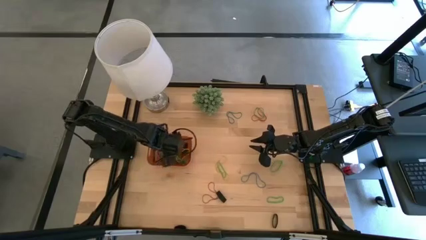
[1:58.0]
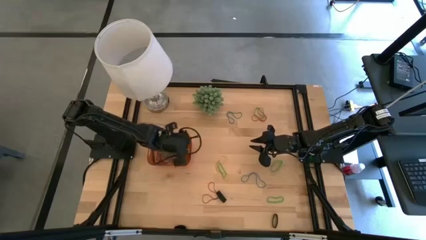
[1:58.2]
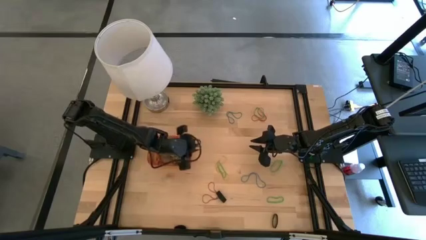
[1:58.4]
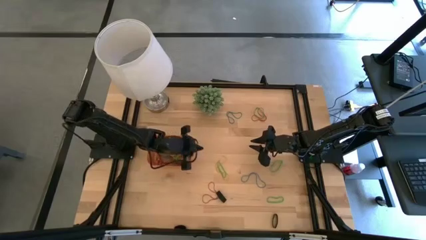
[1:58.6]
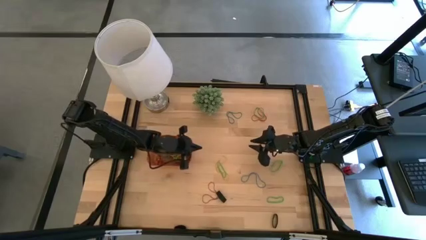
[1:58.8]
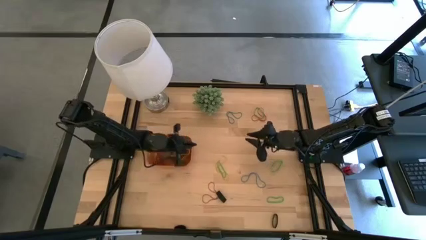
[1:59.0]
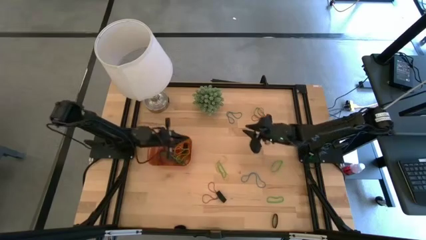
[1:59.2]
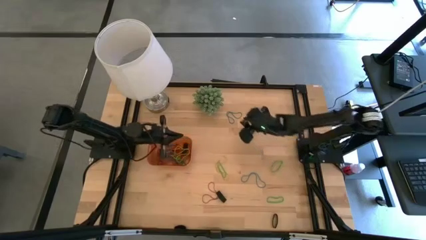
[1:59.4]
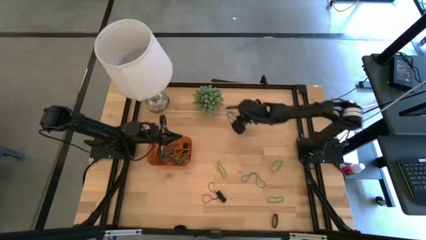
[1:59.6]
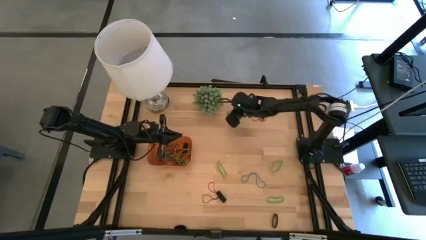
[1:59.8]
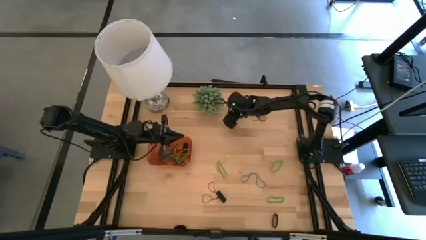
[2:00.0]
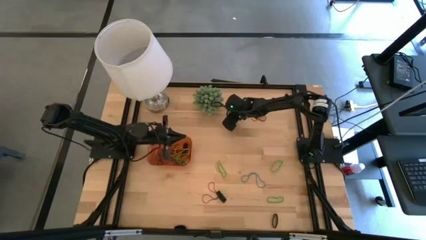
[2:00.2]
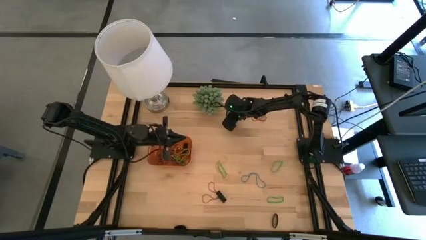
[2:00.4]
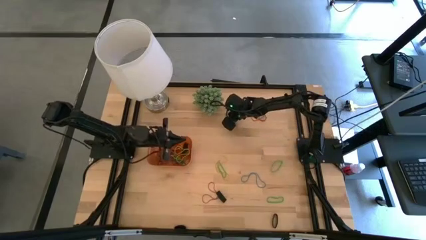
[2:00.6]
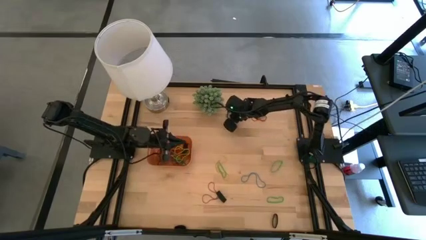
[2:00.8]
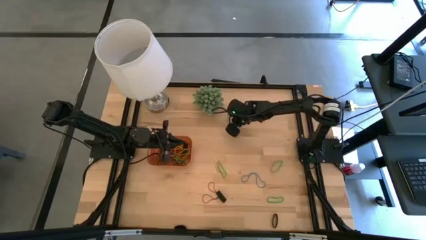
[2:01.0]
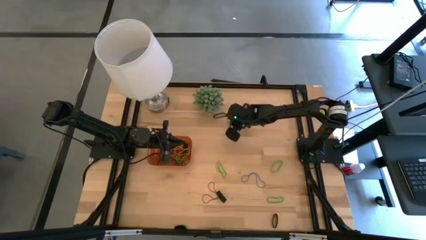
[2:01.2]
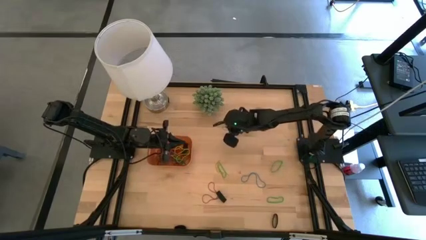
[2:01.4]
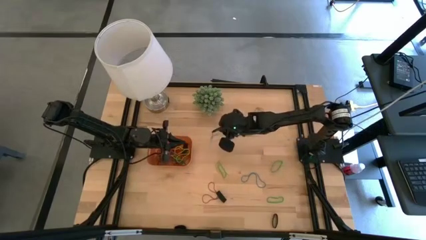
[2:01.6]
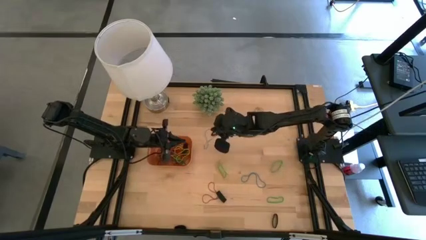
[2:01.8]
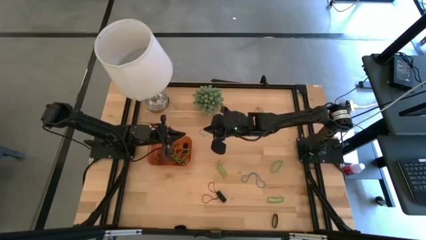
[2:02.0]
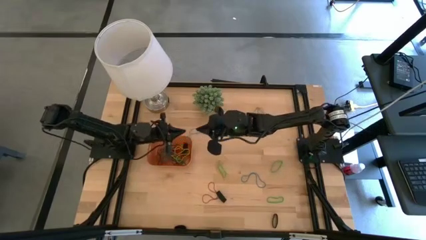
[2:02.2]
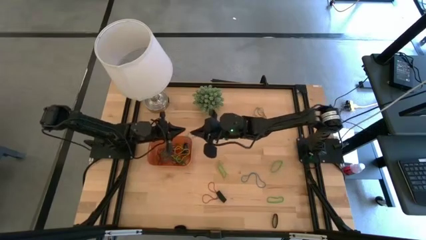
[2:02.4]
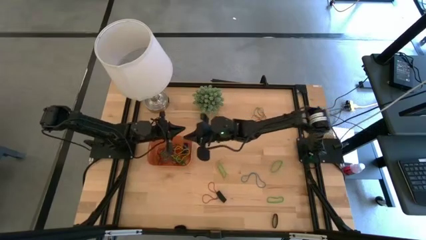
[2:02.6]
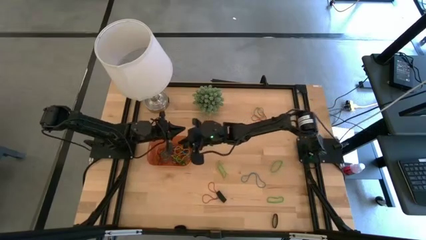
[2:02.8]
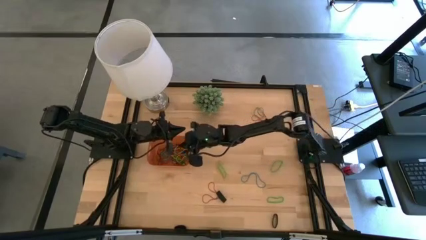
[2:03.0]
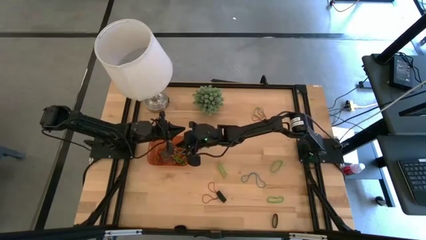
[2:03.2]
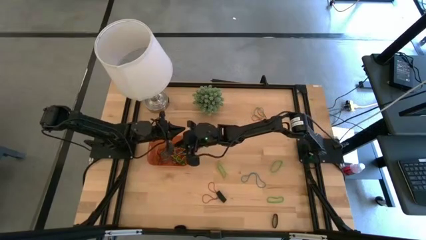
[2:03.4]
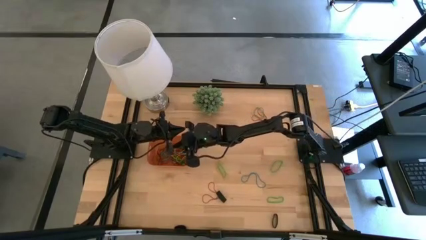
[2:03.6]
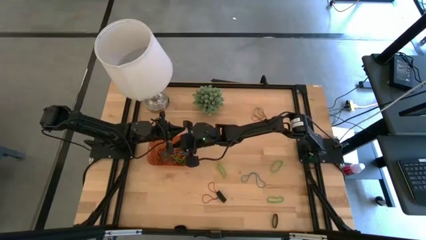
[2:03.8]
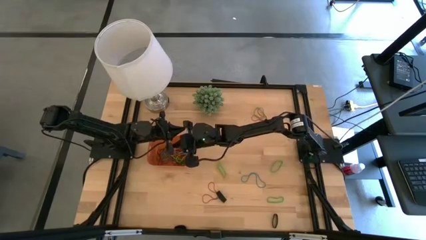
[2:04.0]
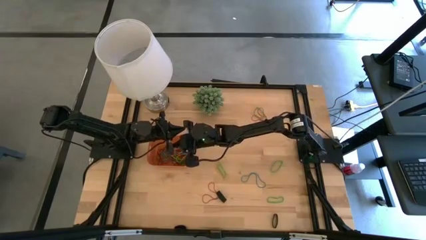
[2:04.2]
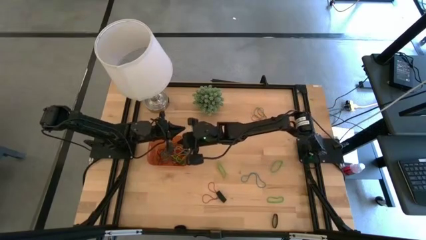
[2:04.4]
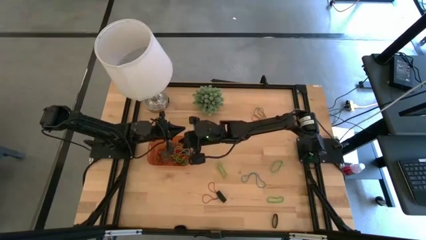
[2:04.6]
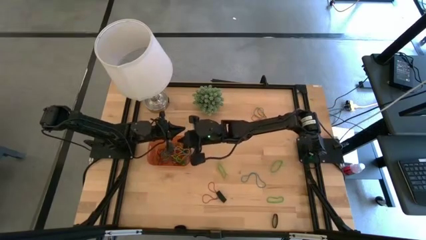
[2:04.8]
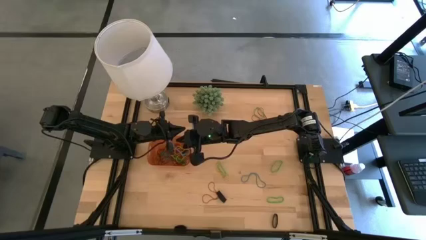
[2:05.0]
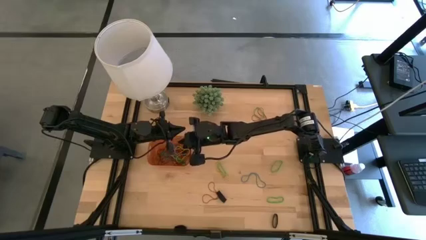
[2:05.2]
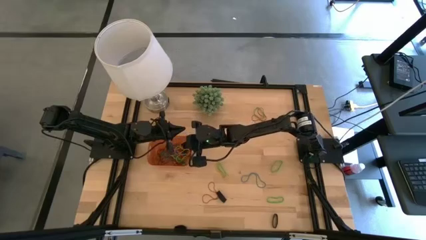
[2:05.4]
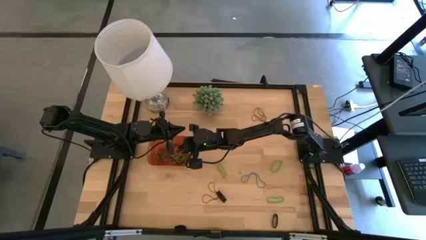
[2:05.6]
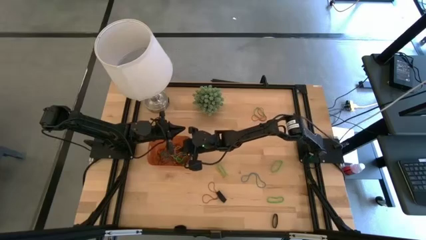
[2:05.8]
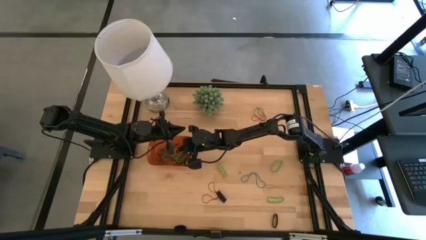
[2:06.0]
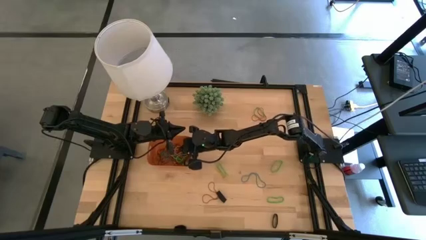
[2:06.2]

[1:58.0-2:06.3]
Task: Pick and place rubber bands into bin
Put the blue rubber band into the orange bin

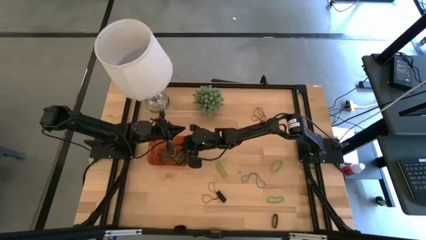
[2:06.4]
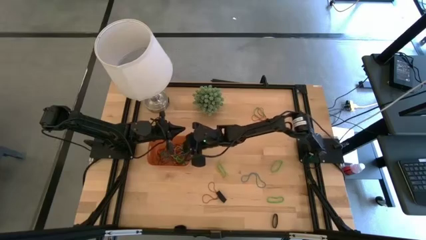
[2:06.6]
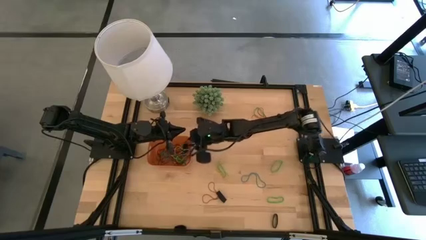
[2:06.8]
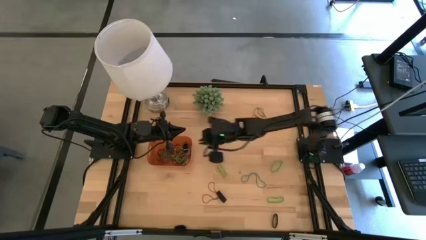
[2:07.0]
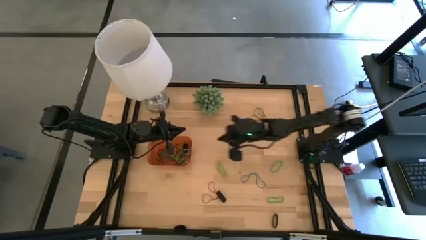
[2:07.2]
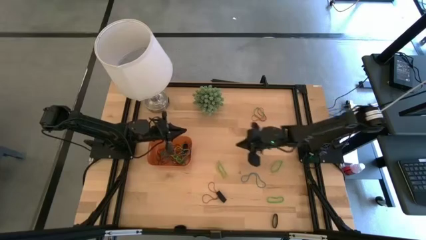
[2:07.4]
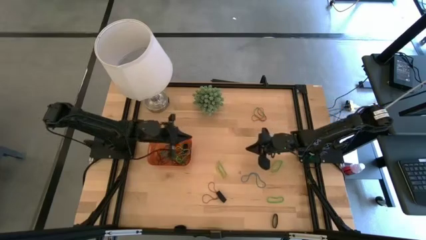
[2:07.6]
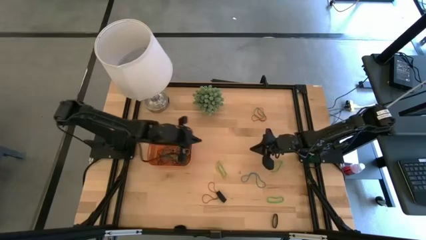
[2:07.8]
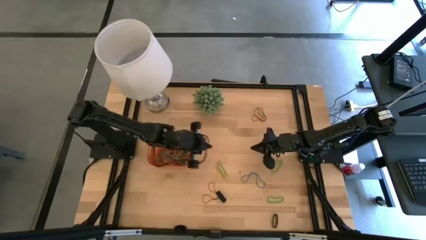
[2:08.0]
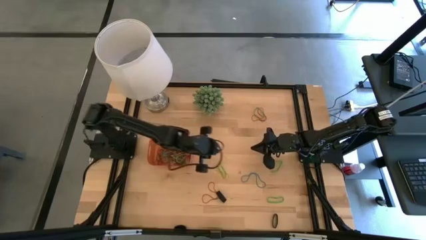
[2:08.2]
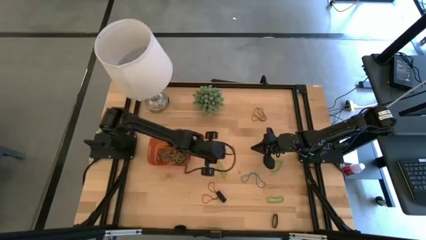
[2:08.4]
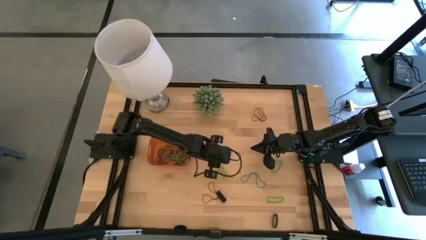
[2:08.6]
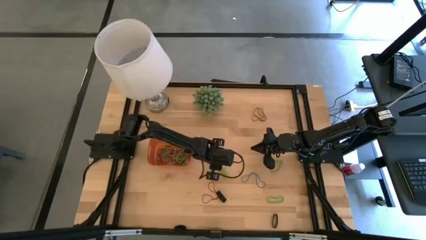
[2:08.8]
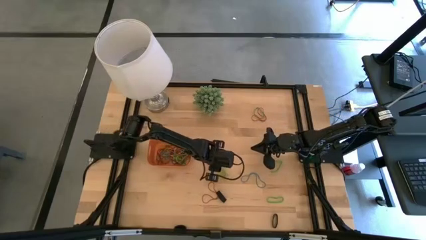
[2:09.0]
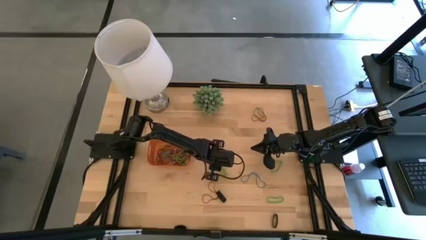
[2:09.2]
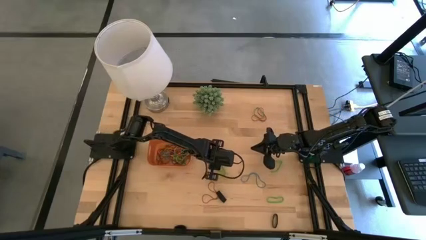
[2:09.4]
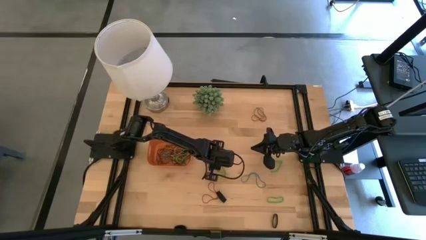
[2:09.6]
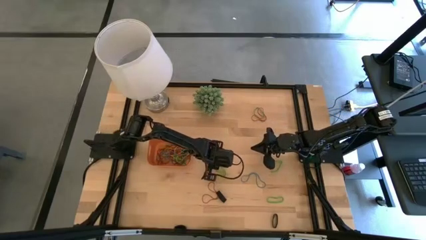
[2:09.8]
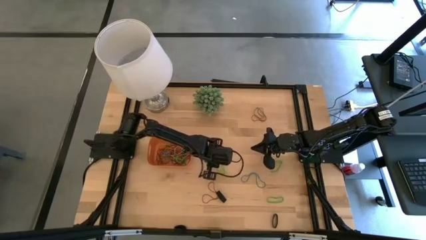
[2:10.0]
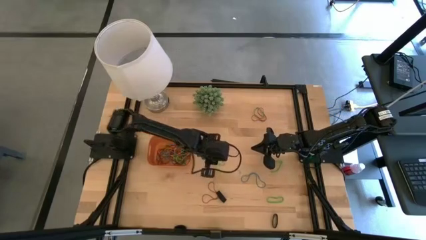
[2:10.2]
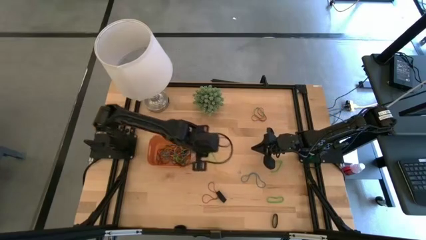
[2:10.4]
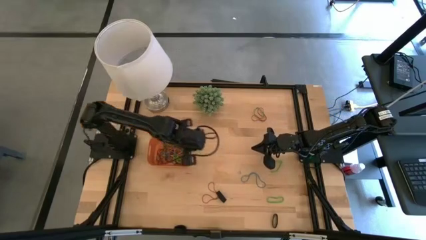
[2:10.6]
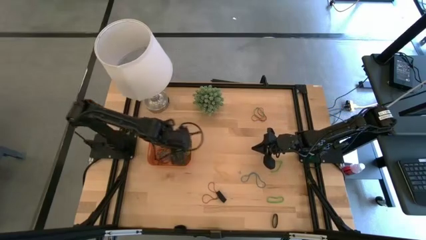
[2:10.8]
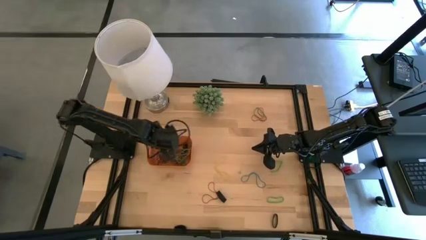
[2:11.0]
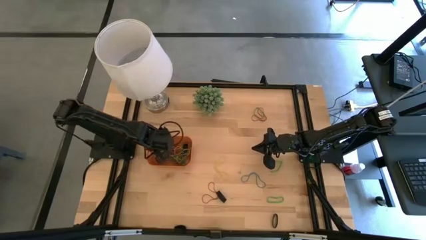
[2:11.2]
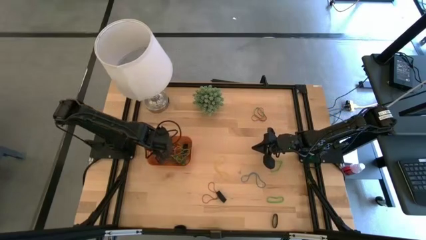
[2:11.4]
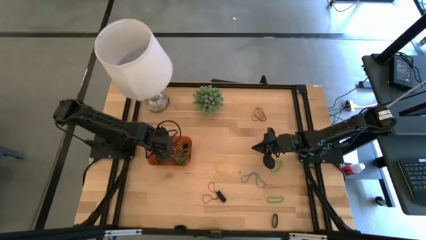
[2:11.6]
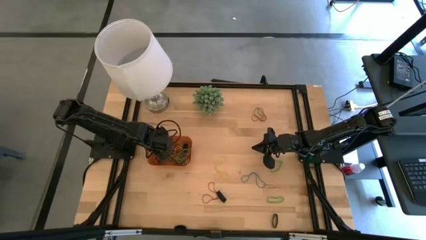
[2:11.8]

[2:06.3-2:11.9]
Put the green rubber band into the orange bin

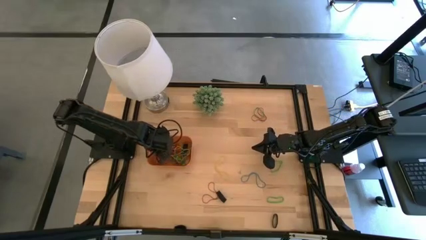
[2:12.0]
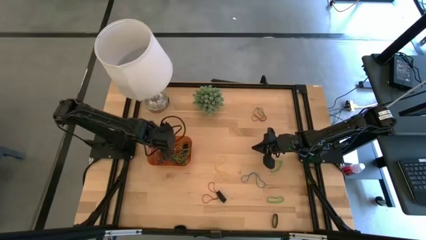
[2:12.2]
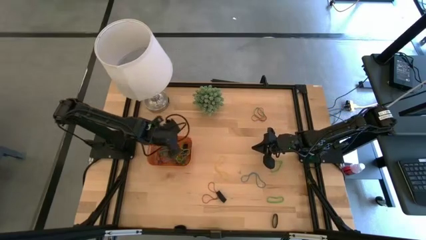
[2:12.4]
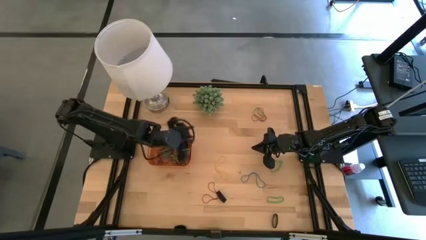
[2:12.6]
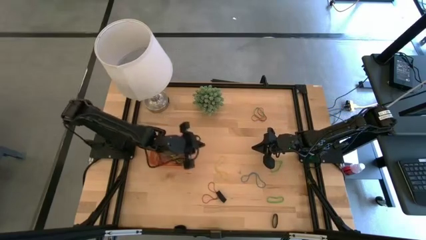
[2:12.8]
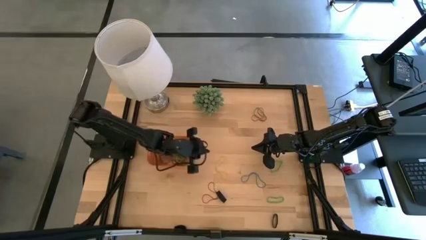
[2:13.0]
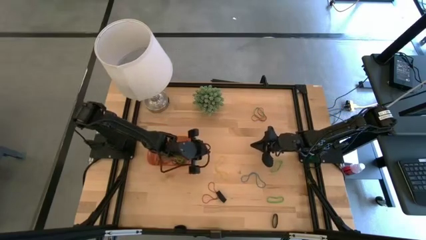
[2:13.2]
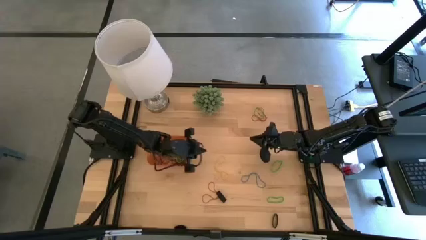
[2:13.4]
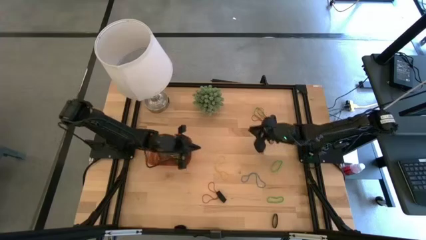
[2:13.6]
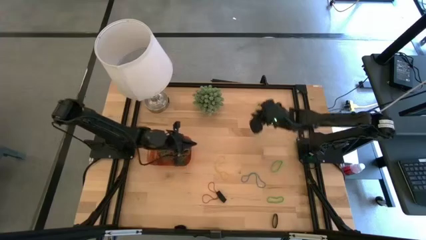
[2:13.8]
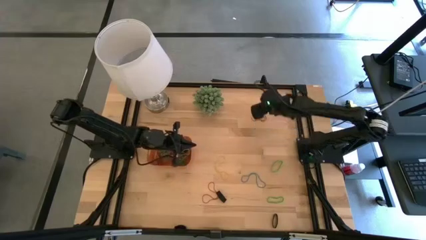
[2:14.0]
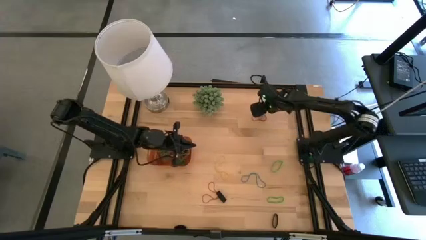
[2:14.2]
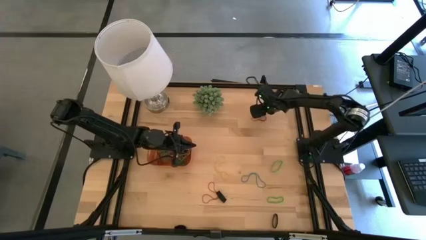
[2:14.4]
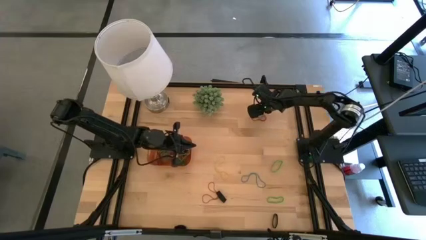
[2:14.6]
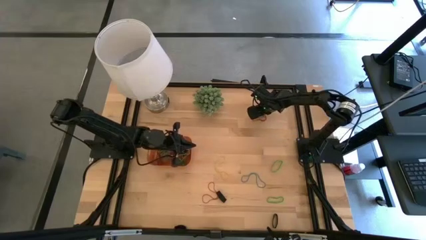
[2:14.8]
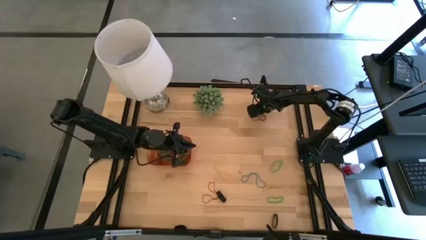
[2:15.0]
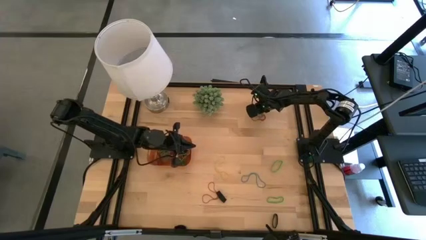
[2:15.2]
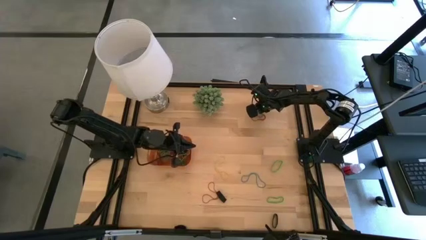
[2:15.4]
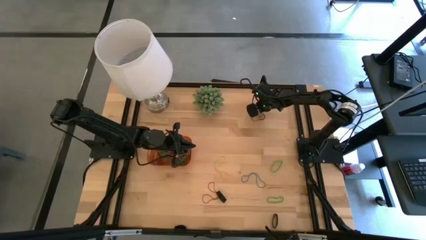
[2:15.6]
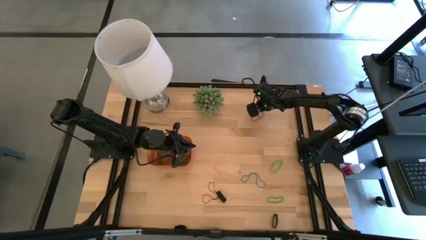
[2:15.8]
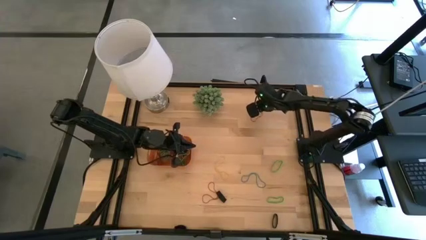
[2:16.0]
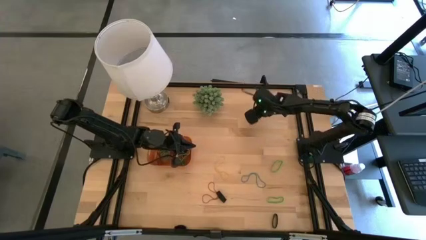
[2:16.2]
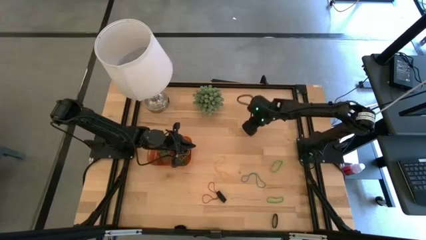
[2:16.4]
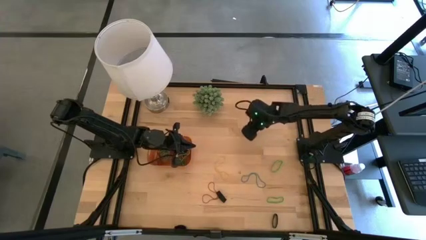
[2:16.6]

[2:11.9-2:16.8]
Put the red rubber band into the orange bin
